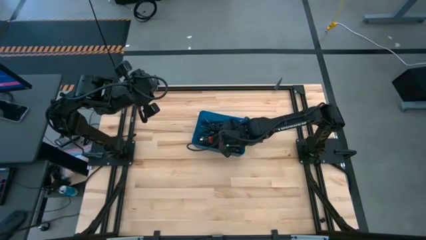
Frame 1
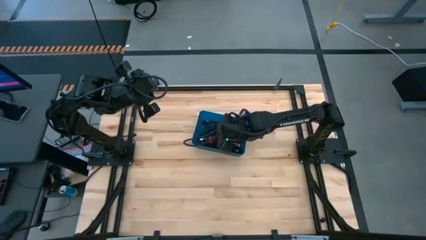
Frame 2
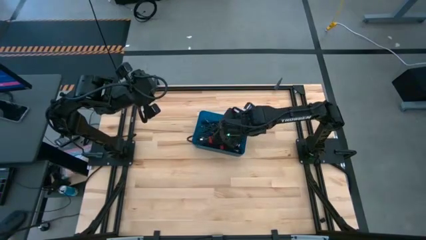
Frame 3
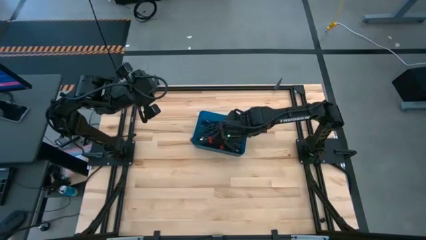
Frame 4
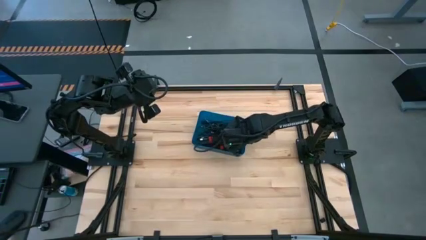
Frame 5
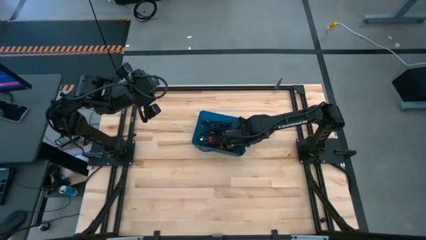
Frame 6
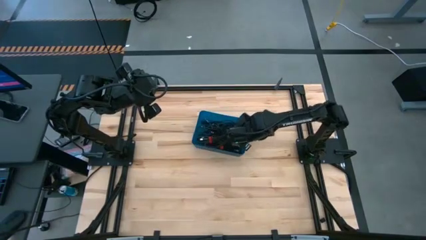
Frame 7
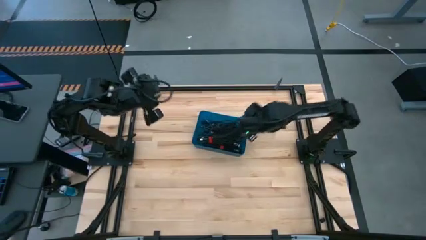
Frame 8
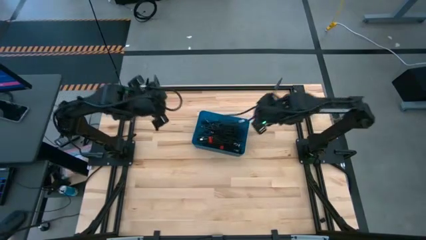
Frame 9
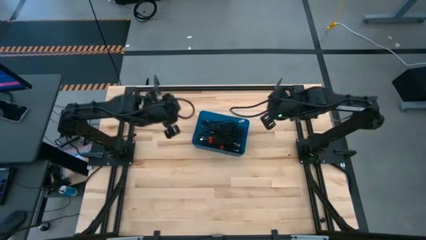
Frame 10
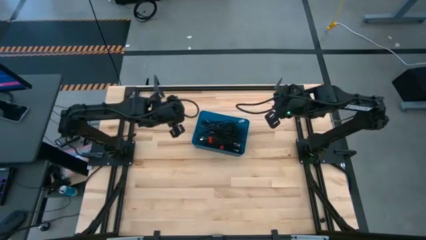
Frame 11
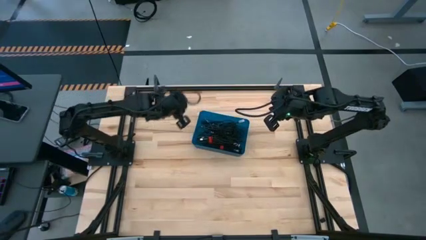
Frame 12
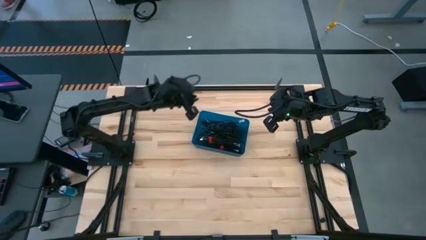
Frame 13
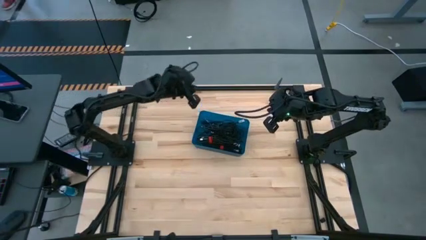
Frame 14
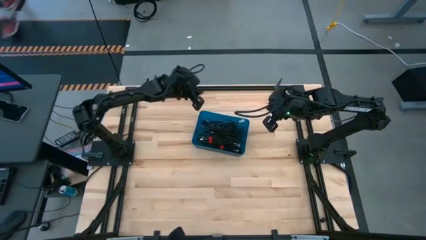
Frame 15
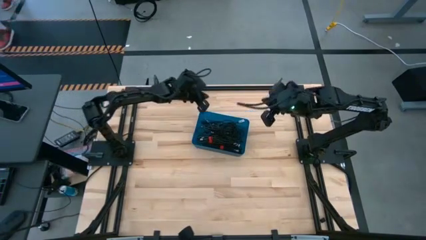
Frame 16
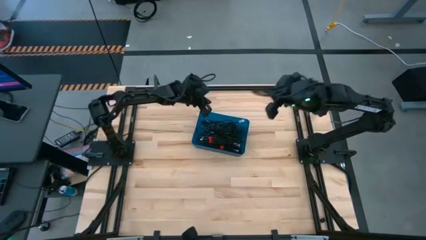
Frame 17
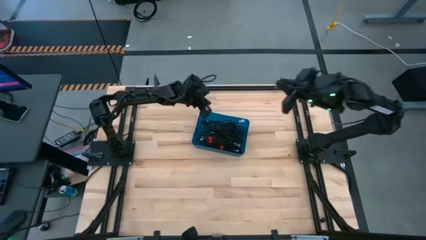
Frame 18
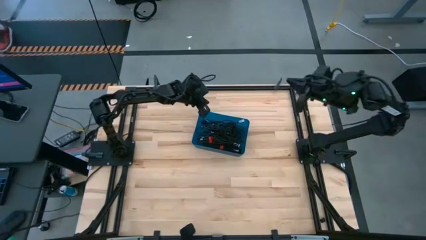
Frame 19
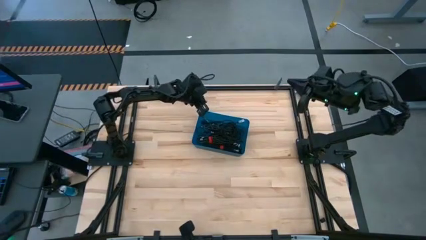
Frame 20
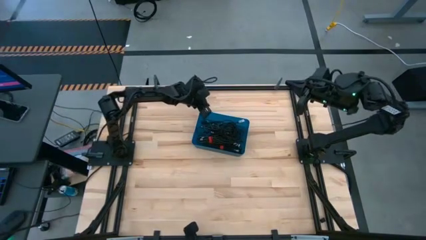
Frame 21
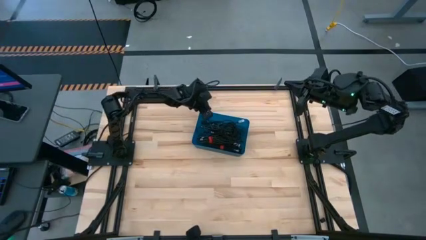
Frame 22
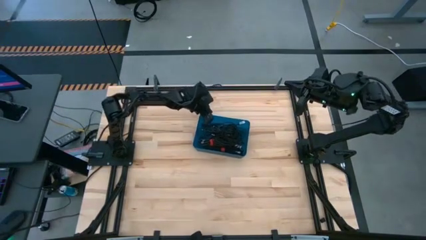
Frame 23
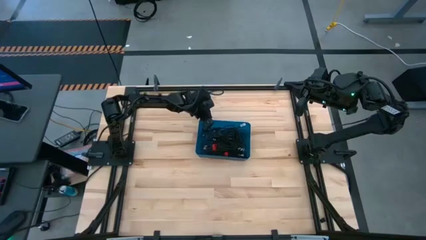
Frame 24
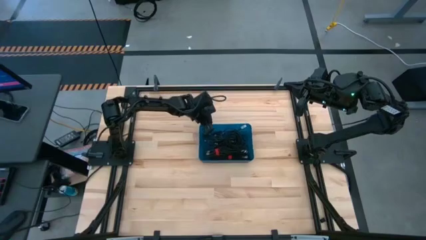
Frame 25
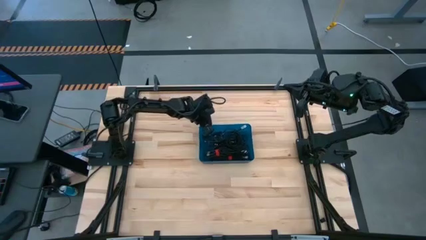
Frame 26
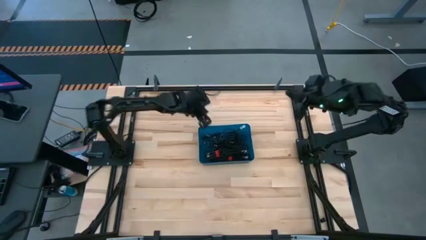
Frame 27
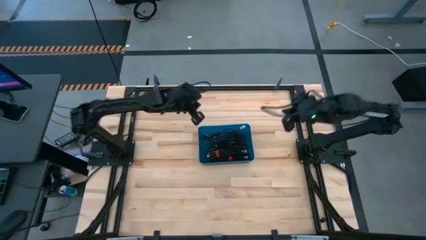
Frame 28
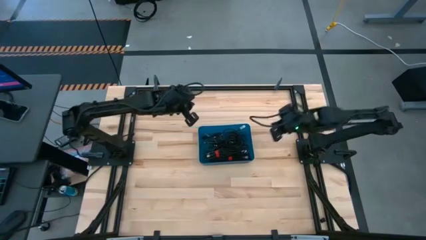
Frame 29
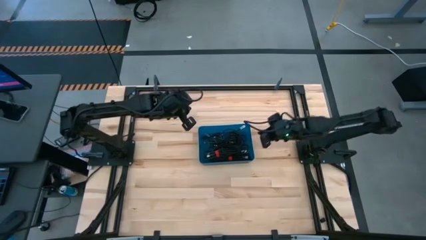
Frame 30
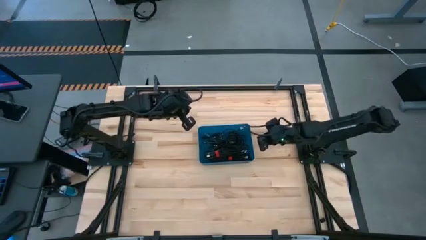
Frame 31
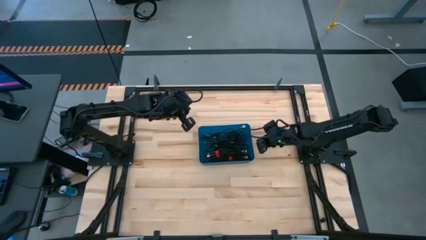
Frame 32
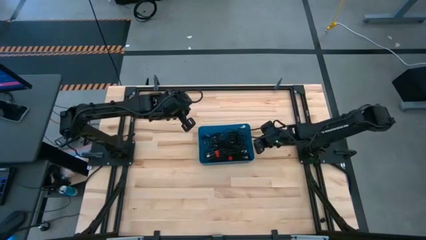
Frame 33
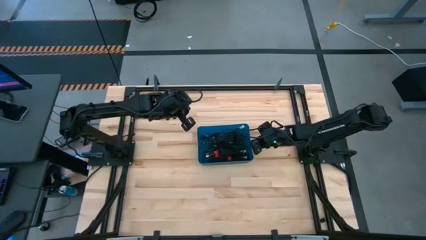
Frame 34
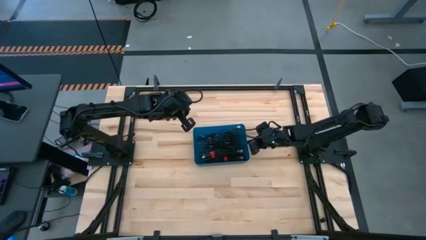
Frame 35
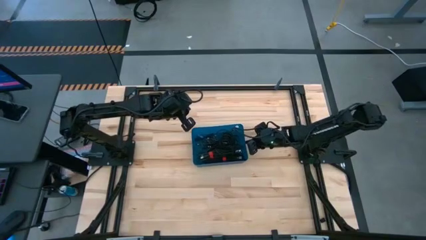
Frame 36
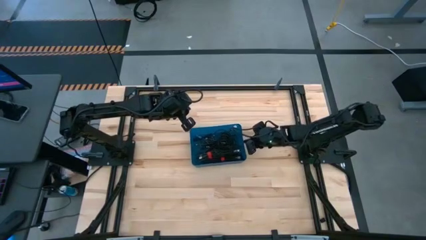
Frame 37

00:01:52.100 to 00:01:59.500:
Task: Pick and place USB-C Cables
Adjust the blue bin

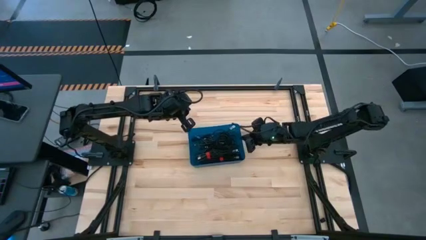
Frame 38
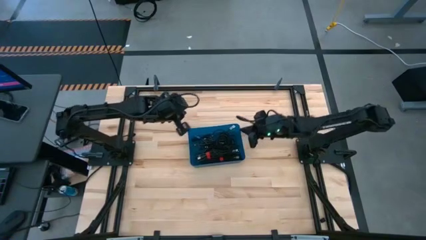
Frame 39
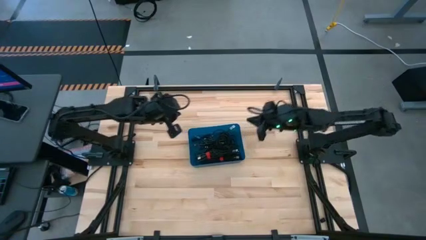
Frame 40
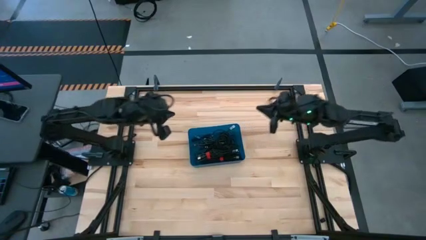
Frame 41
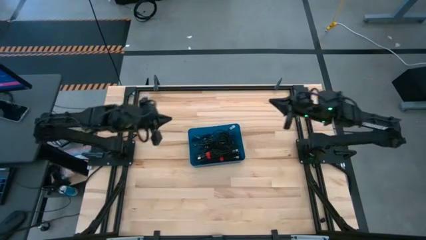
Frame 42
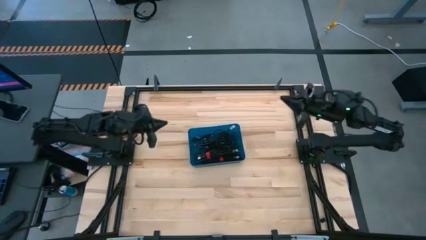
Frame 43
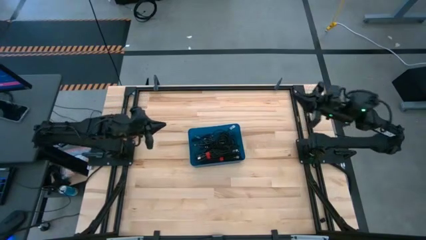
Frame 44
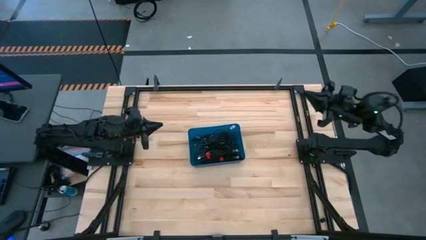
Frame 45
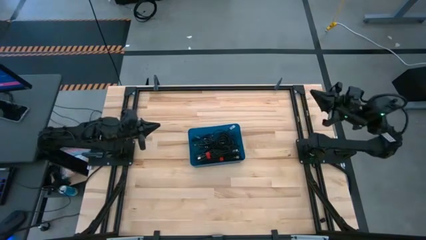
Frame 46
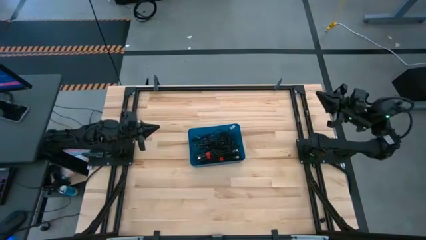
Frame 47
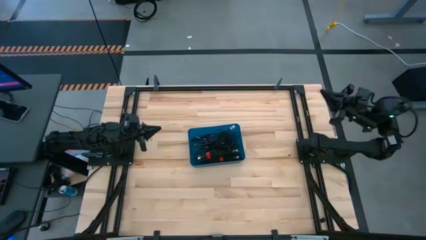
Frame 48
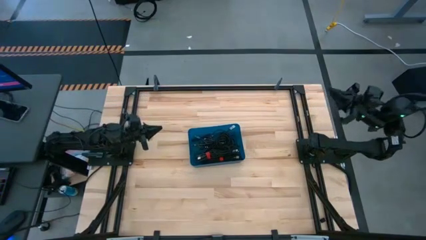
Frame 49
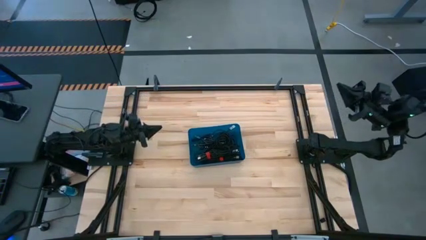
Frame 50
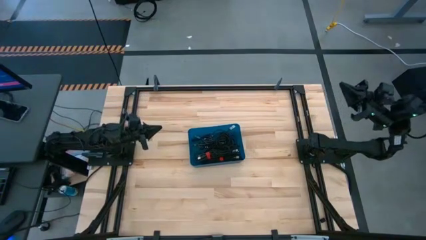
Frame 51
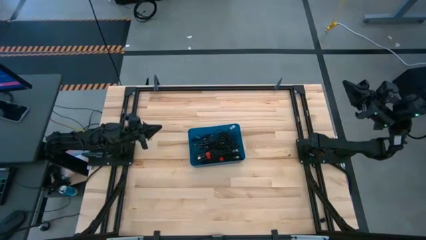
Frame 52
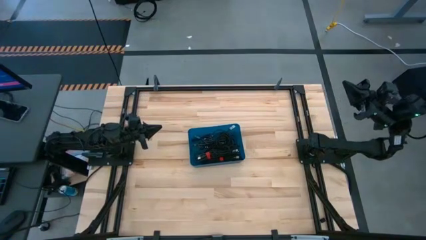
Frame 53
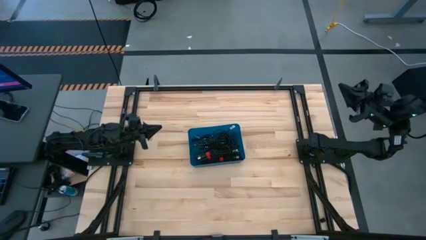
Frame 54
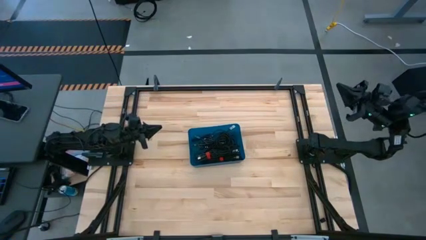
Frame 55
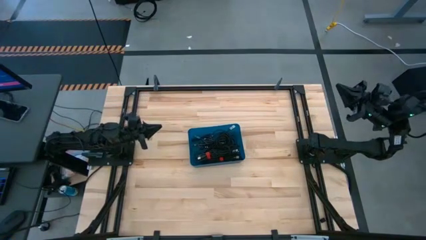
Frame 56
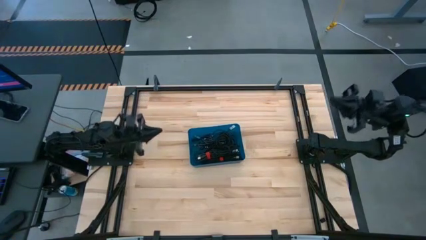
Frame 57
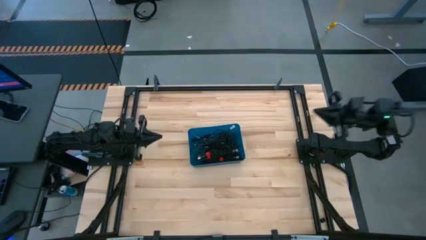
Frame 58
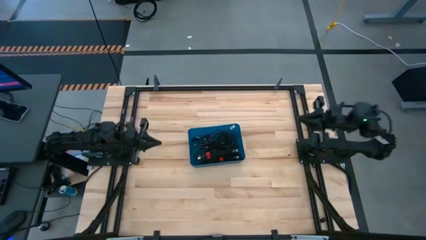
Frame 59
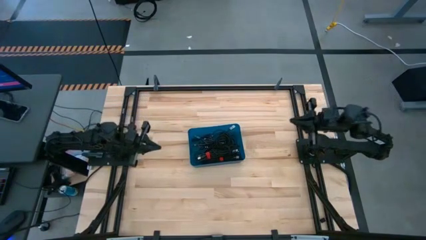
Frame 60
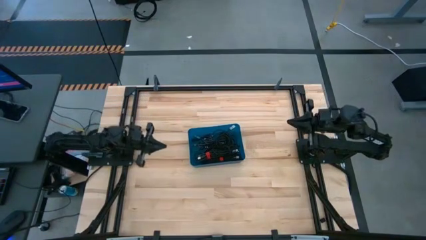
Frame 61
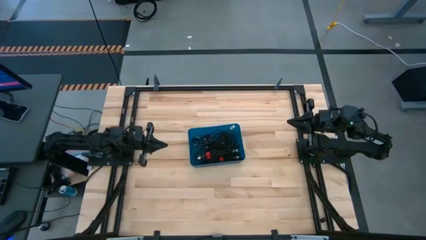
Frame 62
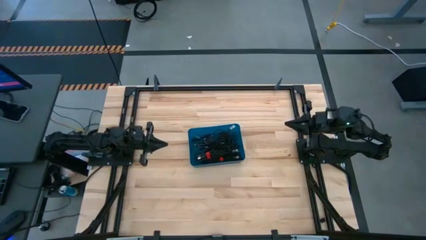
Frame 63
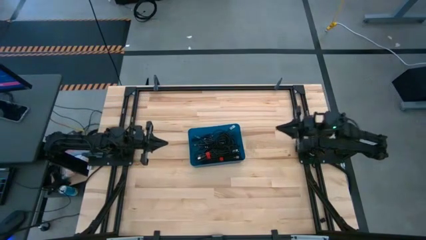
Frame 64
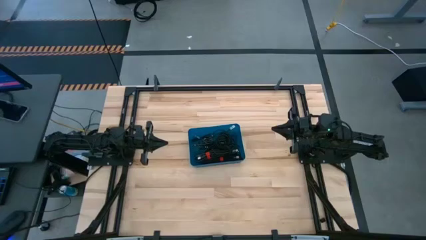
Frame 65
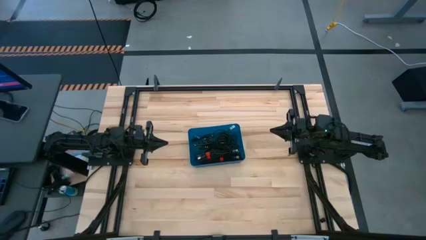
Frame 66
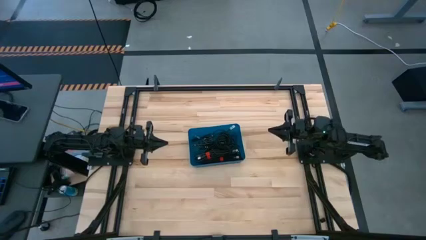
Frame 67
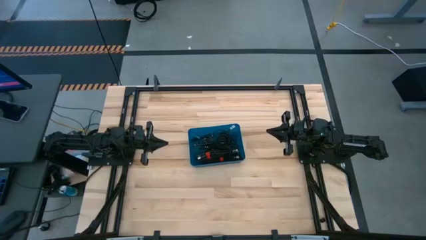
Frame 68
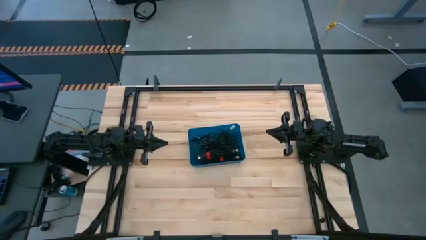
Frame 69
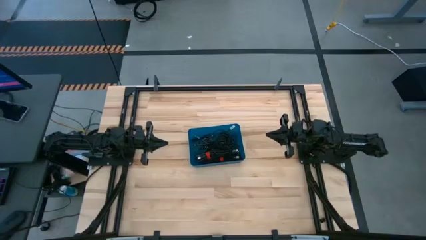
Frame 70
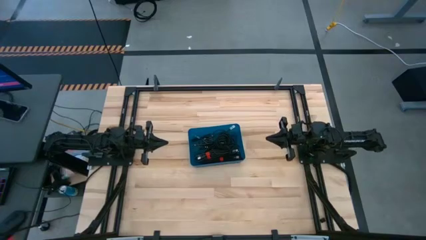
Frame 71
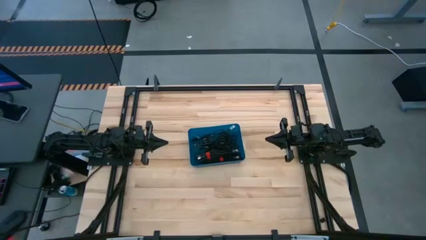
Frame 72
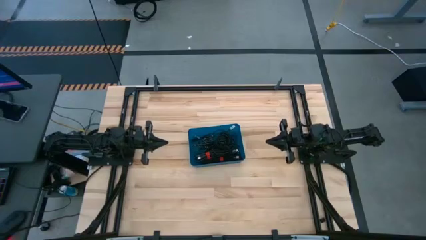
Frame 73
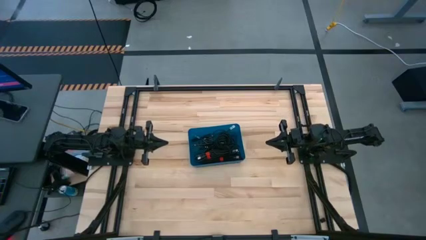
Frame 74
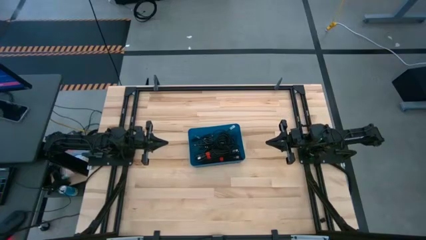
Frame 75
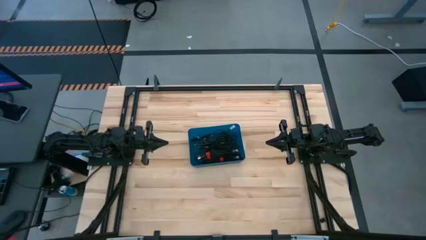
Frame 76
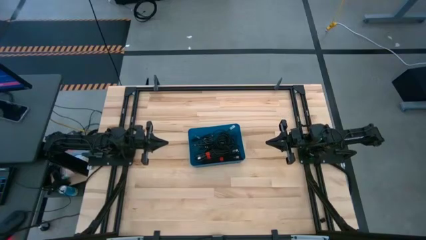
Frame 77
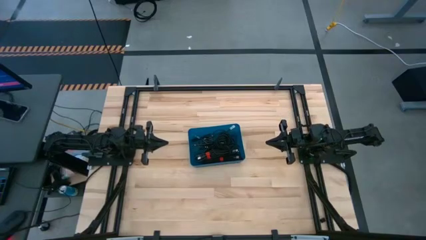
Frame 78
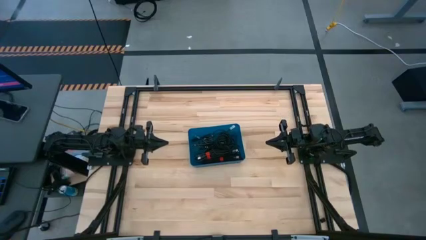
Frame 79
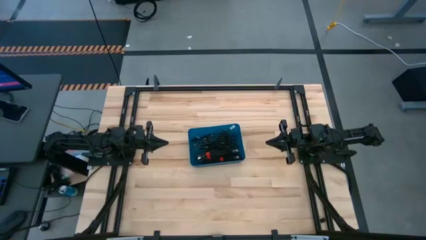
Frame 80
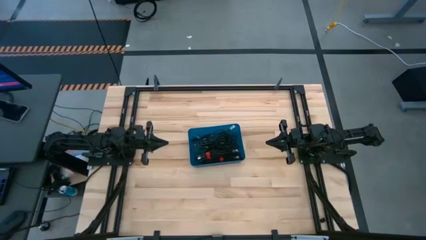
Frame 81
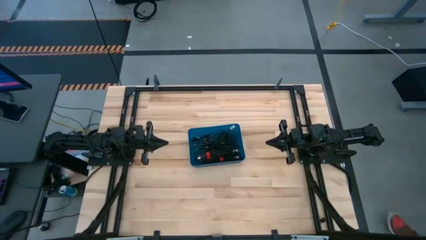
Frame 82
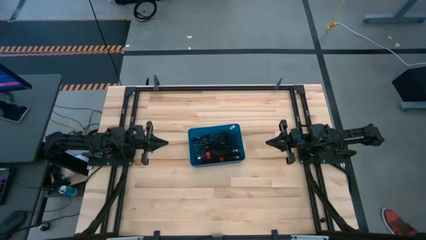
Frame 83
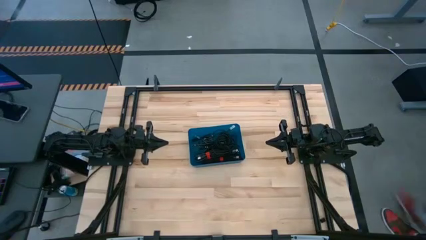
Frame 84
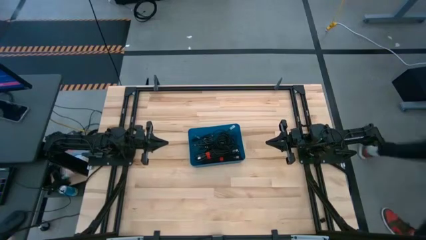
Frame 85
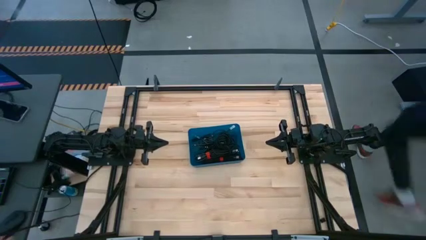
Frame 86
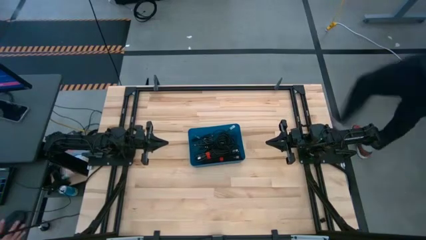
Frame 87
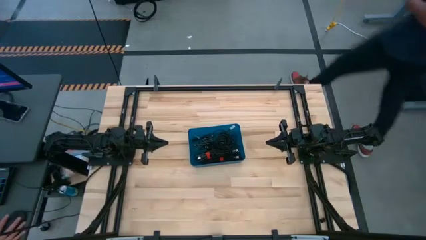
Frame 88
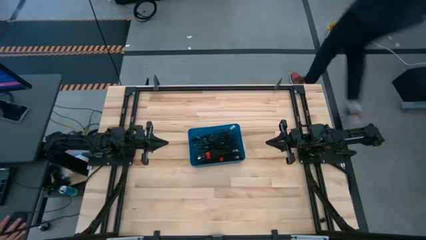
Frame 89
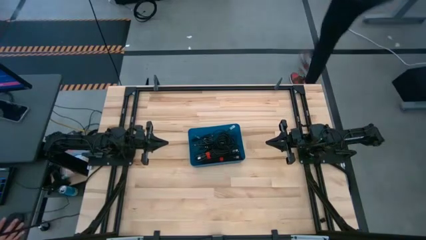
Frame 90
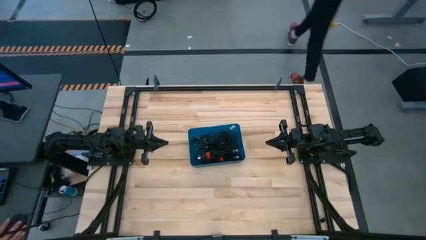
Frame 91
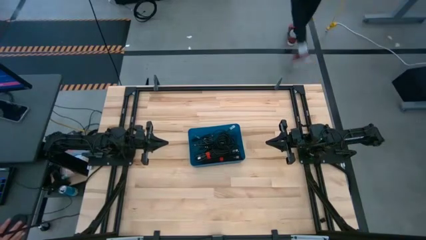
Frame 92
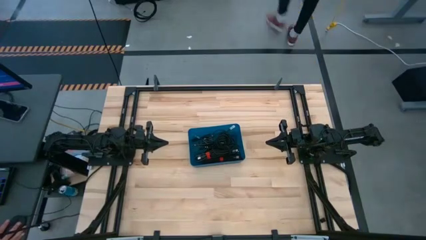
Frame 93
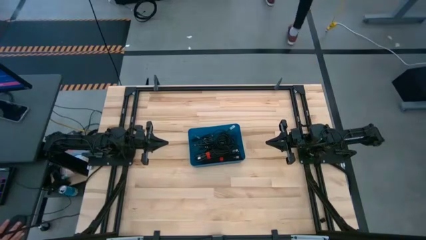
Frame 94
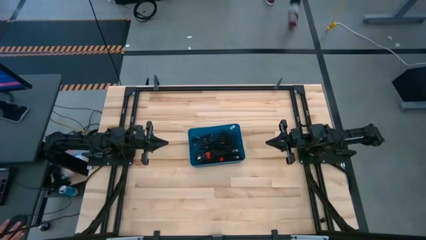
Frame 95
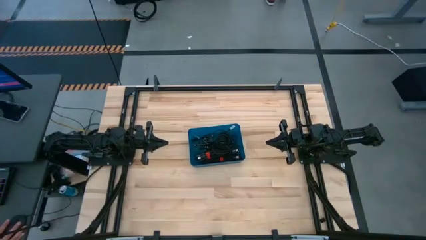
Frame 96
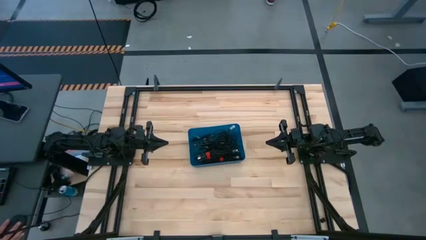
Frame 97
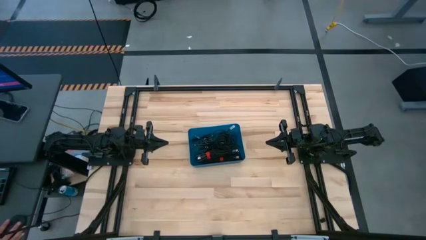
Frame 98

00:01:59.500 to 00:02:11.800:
Return to Home Position
